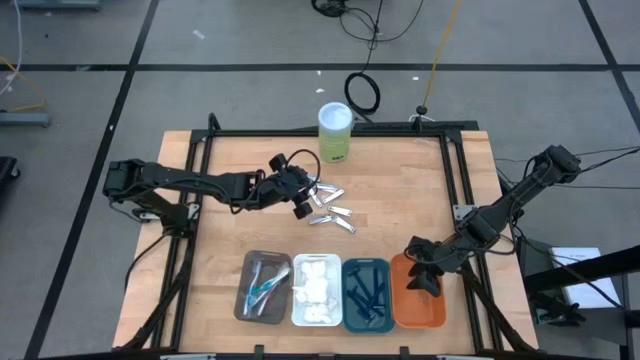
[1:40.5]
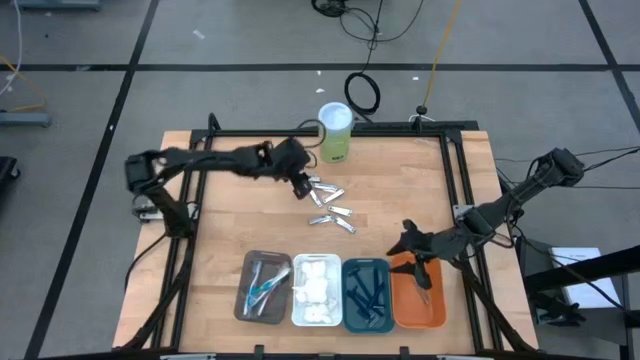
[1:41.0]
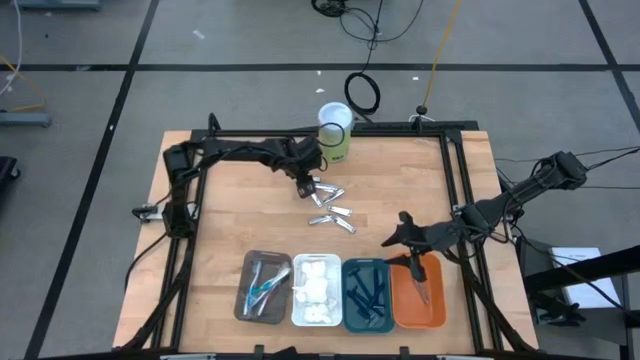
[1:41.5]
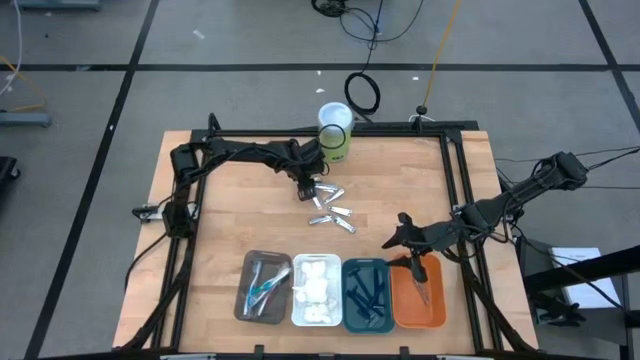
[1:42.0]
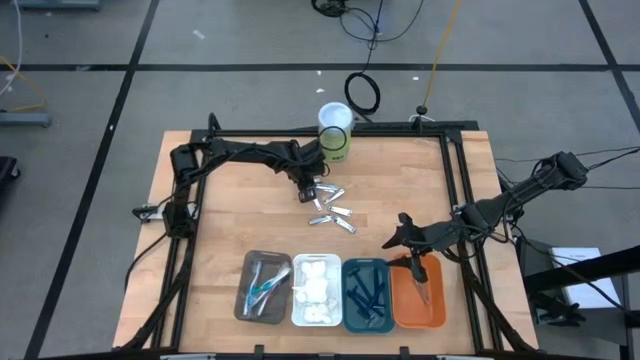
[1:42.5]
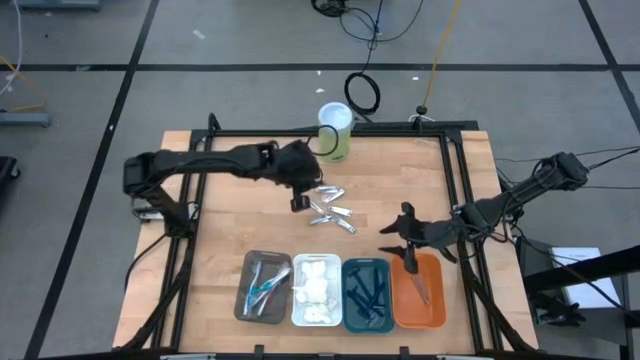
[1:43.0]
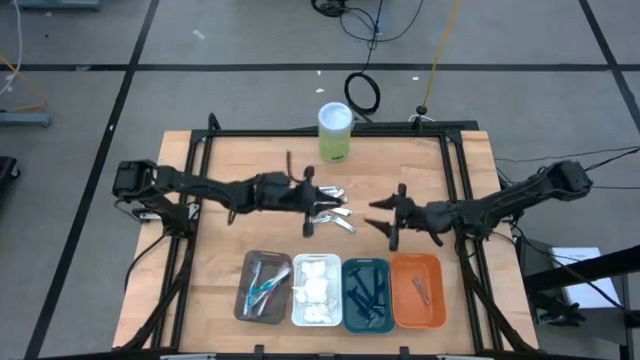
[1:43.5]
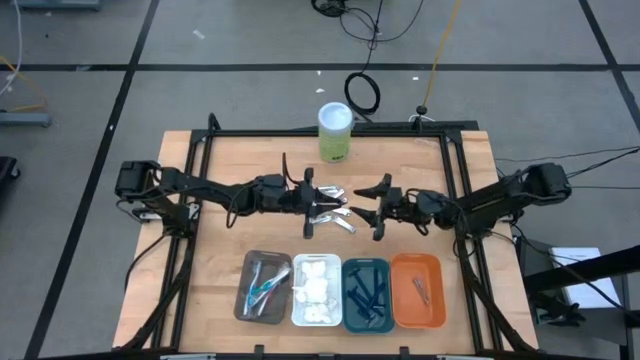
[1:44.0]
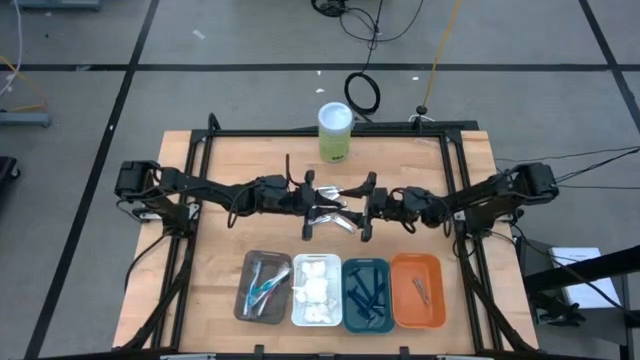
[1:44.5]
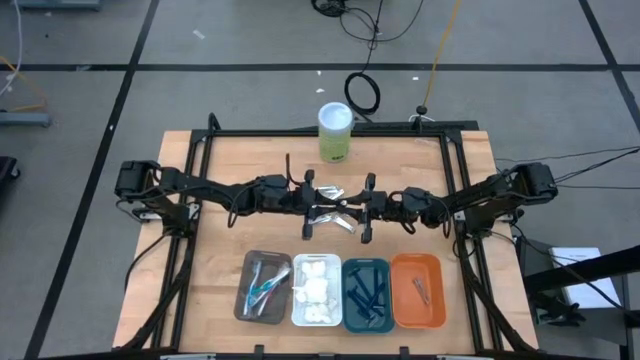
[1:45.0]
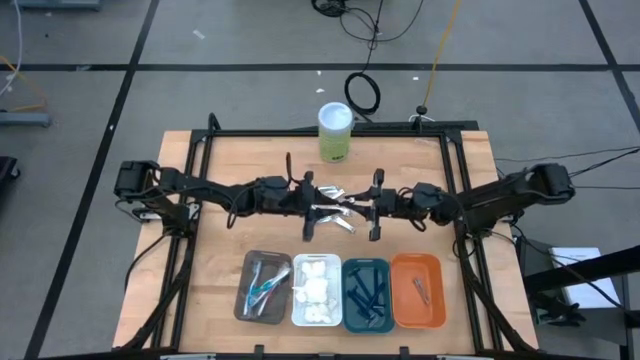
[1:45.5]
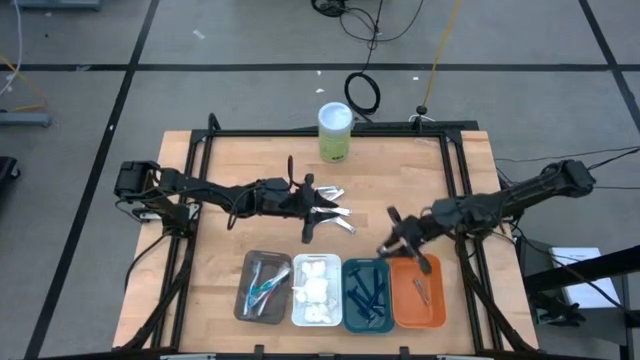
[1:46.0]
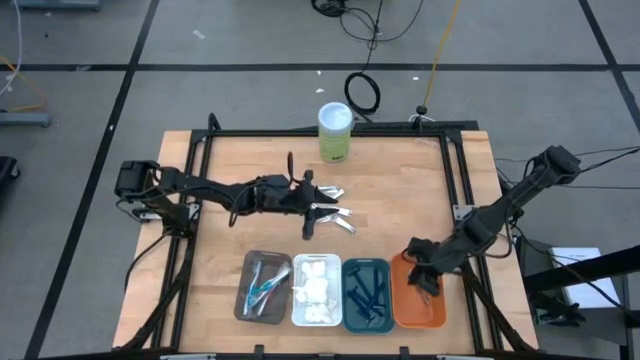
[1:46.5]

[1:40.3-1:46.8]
Task: Pick & Place Travel size toiletries
Put the silver nail cutter into the orange bin

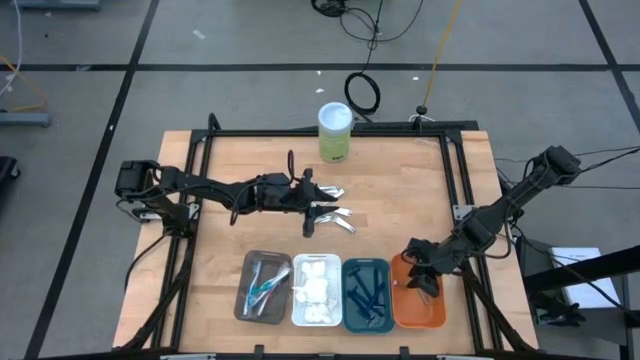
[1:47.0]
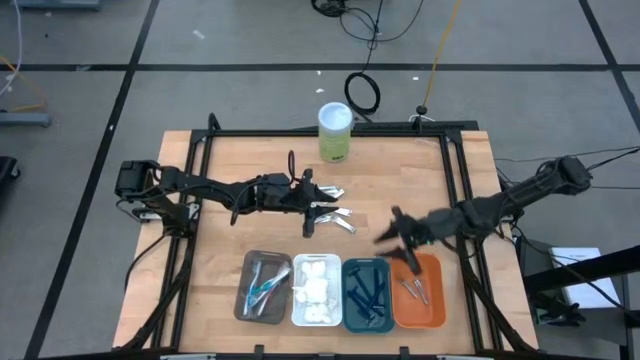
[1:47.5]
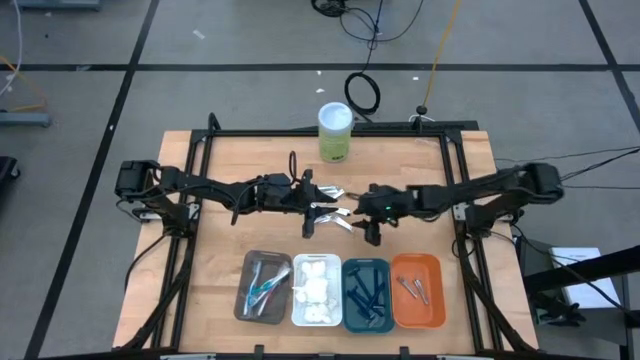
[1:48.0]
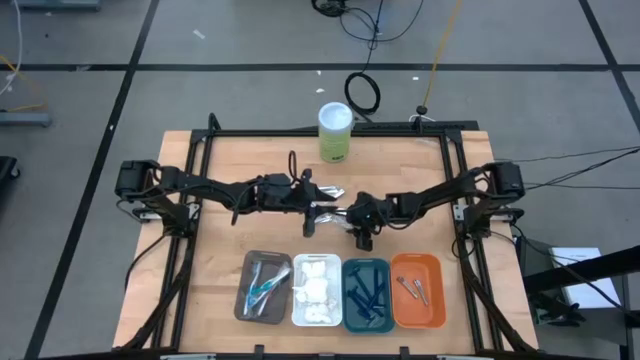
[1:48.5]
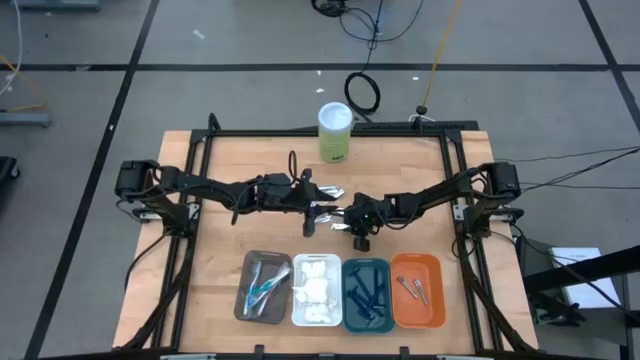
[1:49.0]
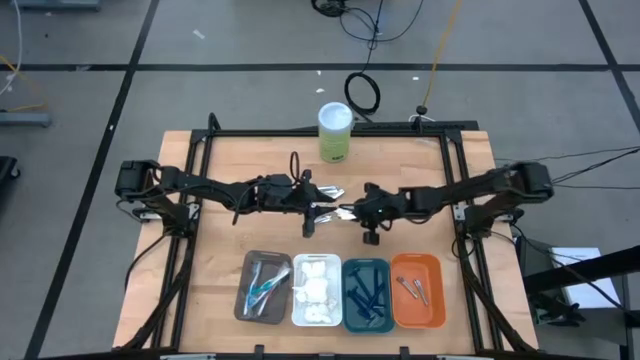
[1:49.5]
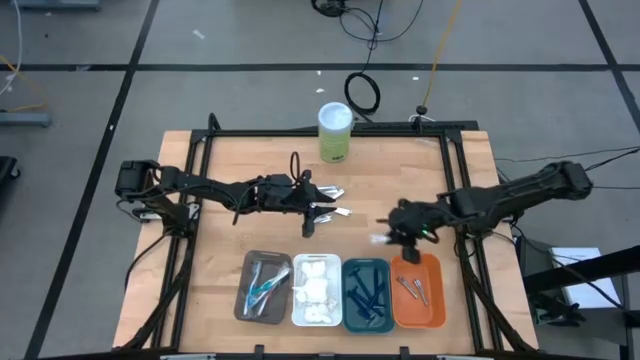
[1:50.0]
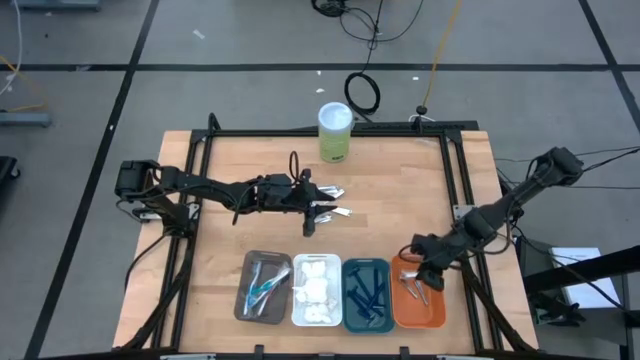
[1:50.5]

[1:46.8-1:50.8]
Put the silver nail cutter into the orange bin

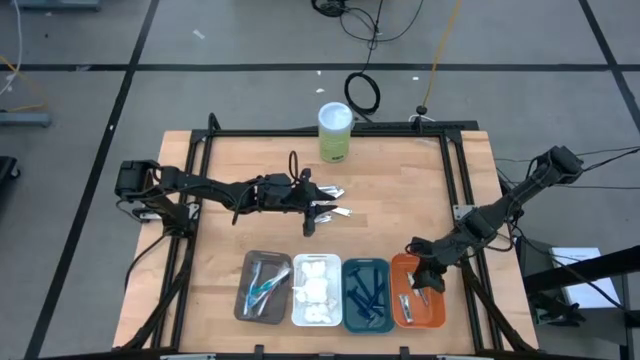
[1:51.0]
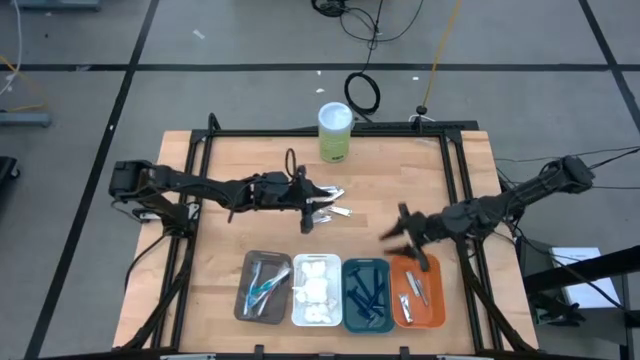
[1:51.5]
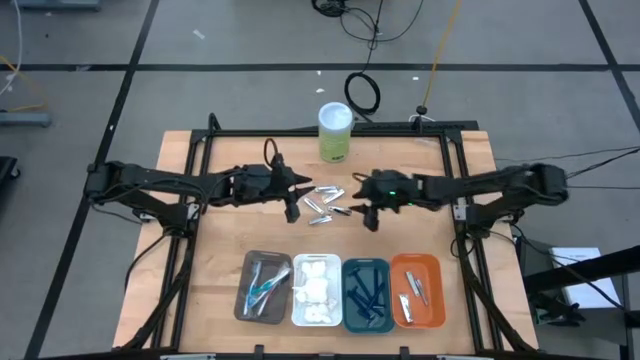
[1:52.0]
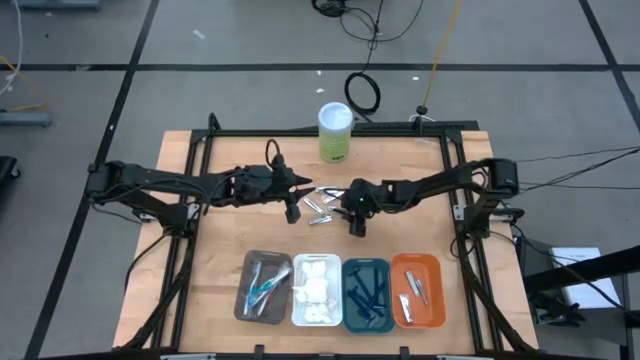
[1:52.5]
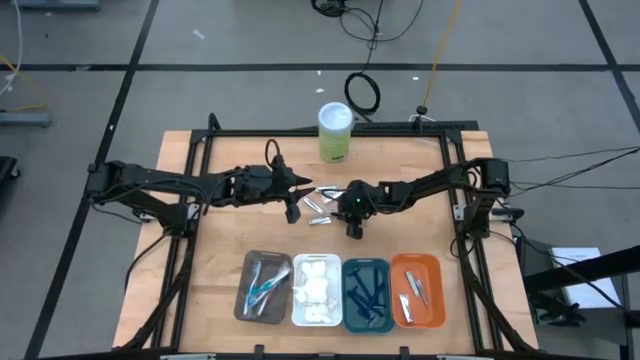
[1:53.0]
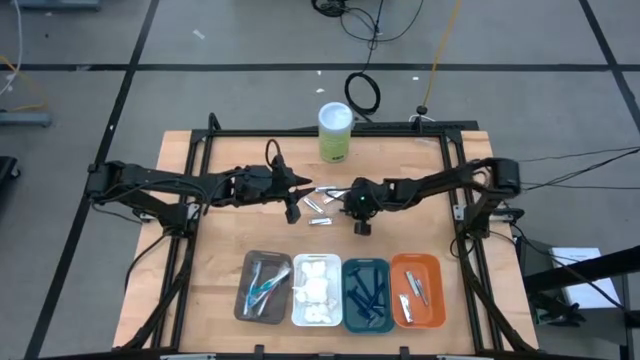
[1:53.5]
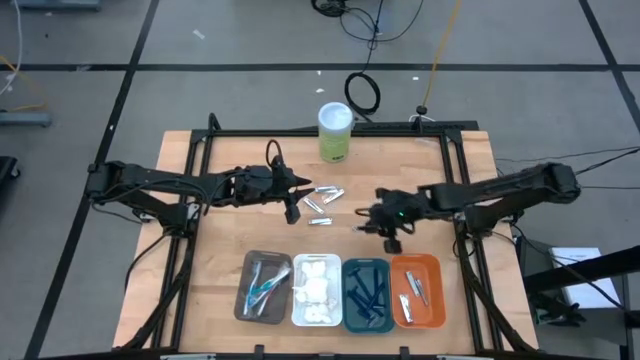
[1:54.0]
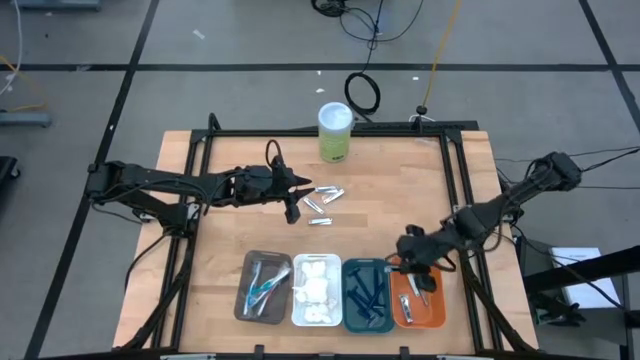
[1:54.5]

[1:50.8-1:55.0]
Put the silver nail cutter into the orange bin

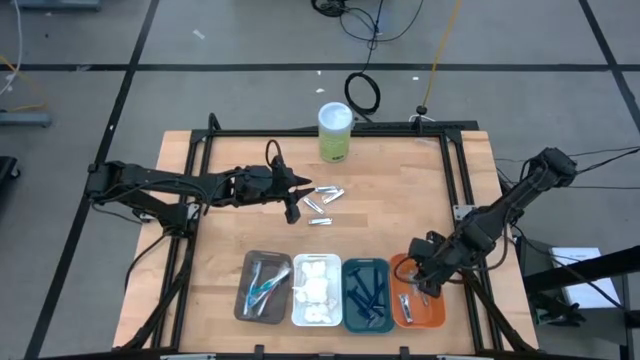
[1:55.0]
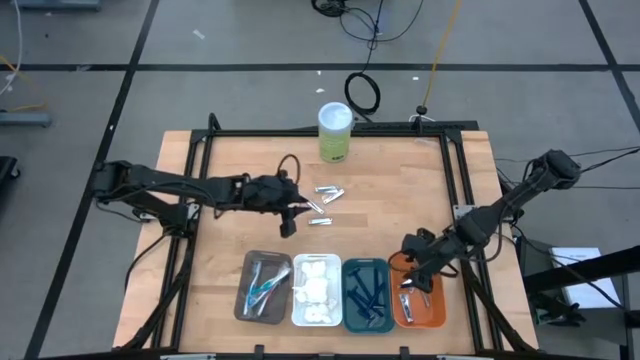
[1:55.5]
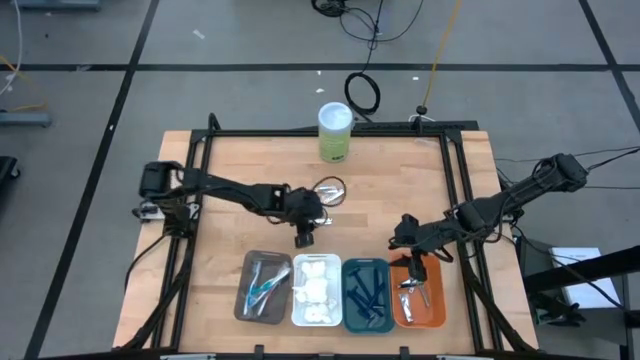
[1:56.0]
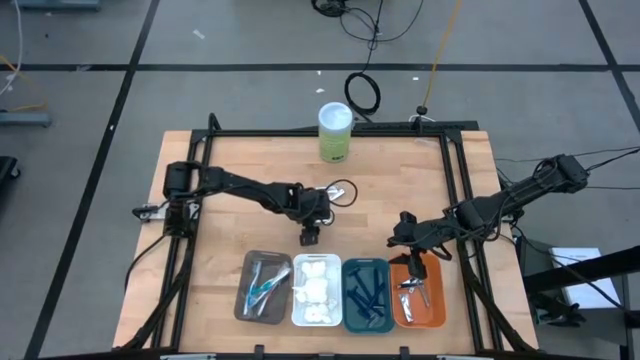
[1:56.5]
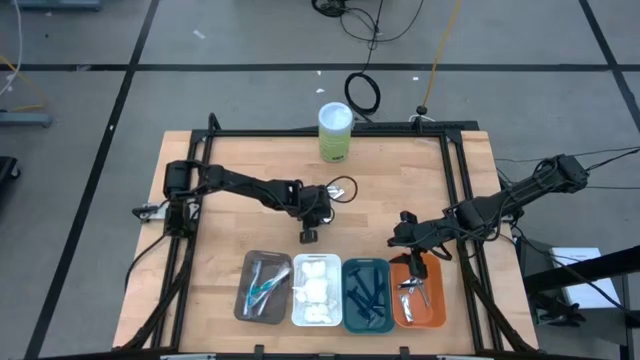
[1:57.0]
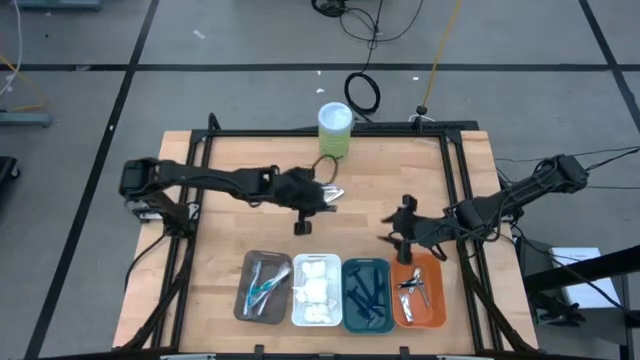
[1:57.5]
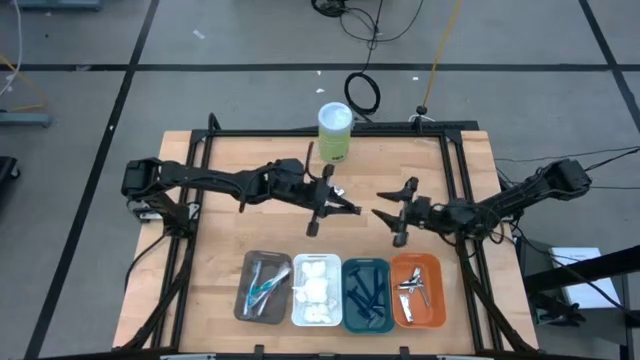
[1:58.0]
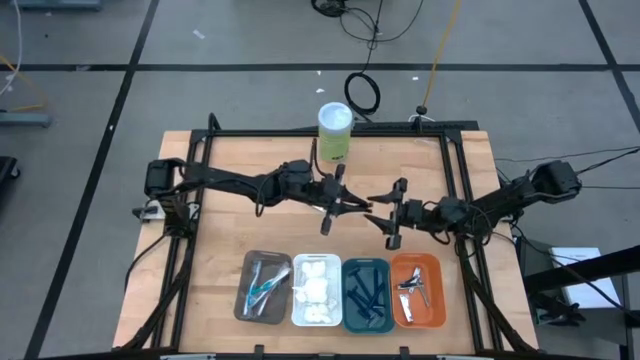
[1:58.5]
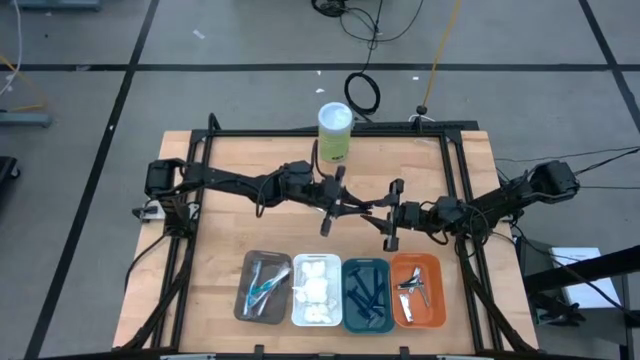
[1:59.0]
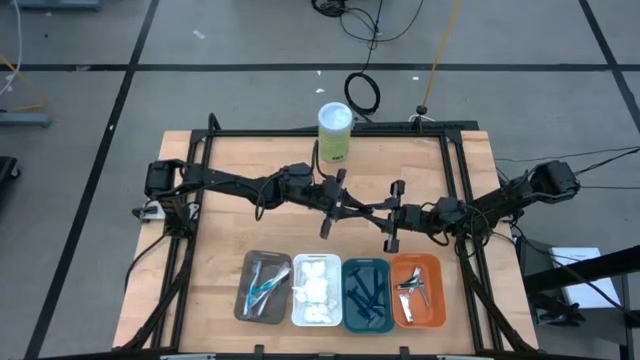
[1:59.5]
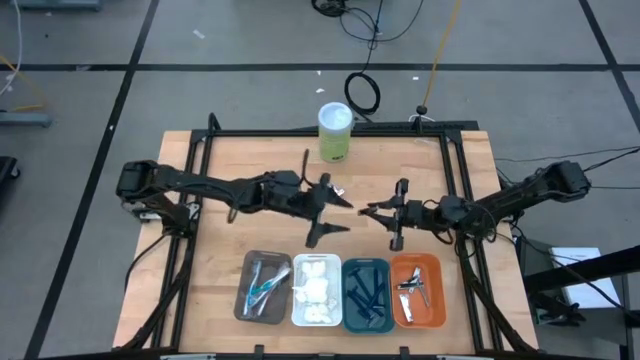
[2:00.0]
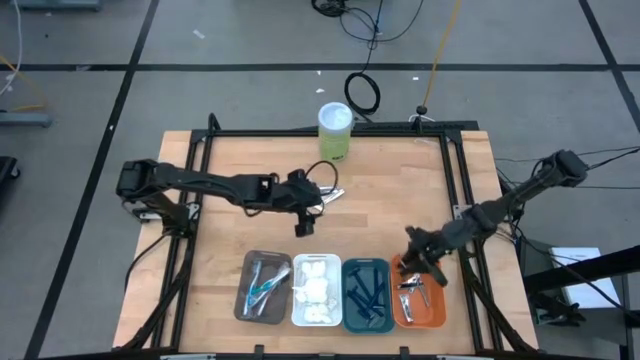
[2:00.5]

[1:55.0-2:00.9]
Put the silver nail cutter into the orange bin

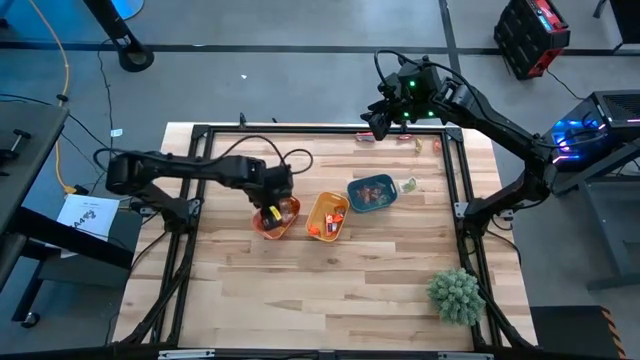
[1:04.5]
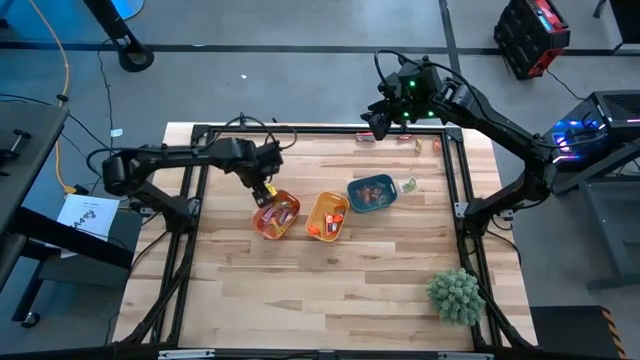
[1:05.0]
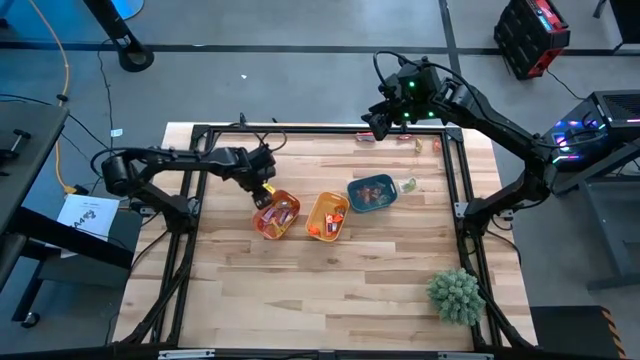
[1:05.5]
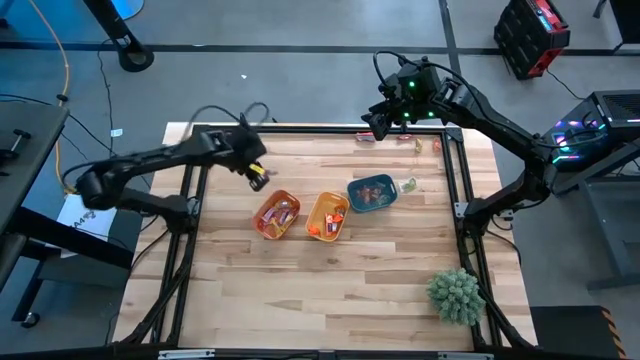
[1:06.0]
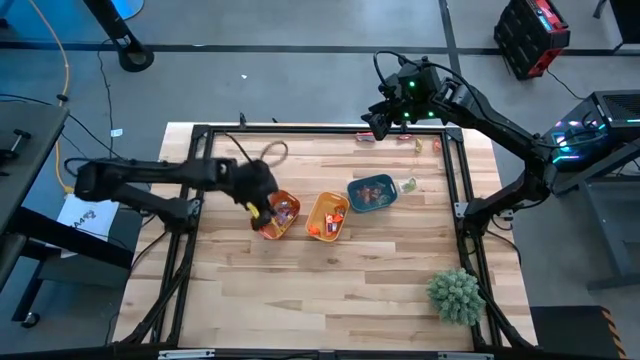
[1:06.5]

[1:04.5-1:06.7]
Task: Sort candy
Put the purple candy into the orange bin
